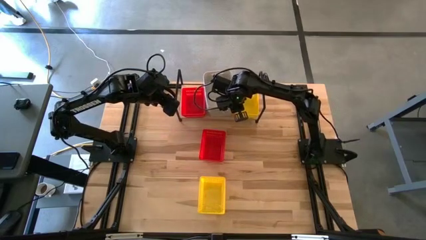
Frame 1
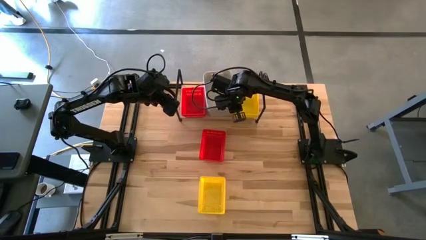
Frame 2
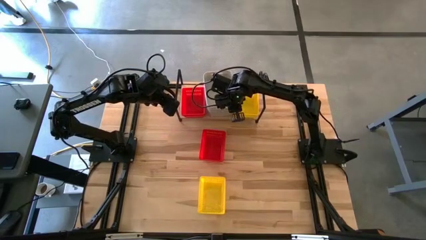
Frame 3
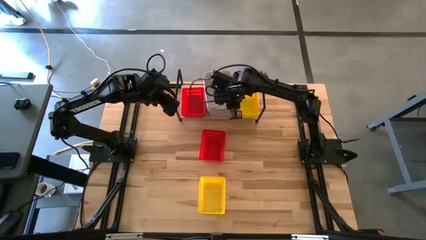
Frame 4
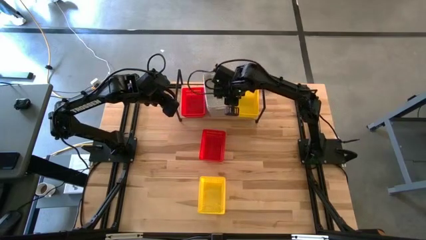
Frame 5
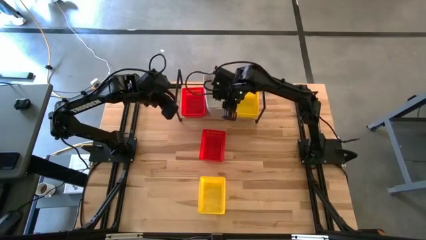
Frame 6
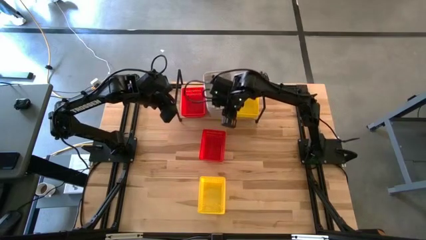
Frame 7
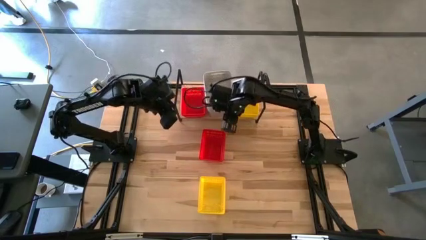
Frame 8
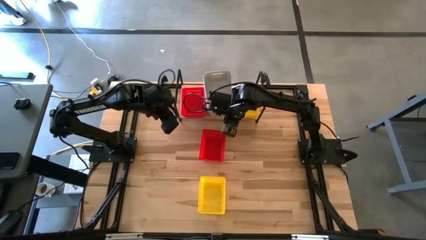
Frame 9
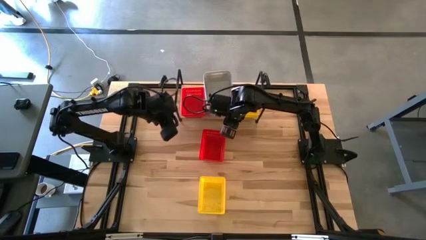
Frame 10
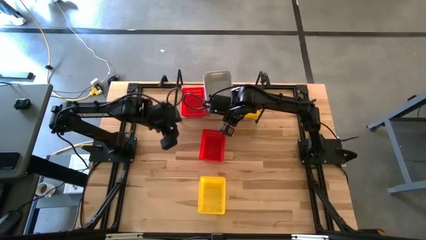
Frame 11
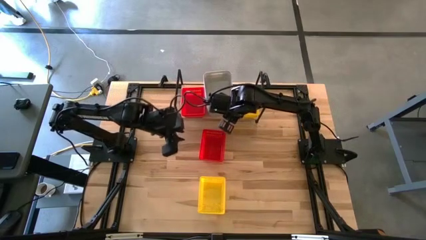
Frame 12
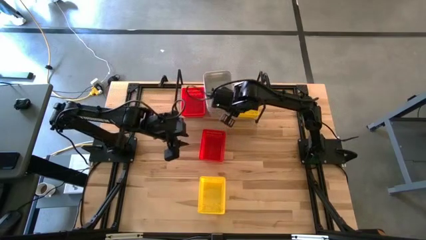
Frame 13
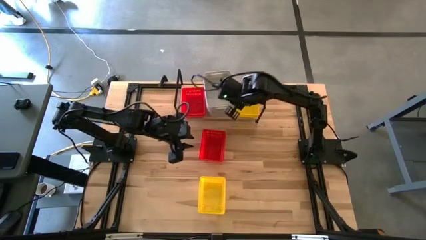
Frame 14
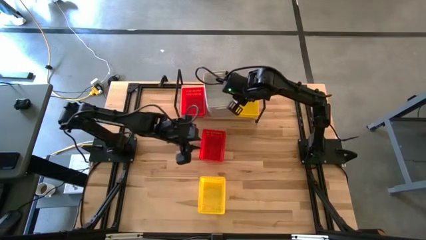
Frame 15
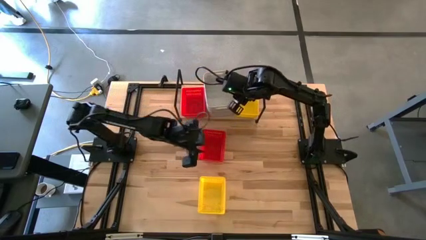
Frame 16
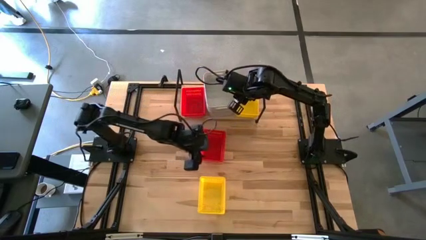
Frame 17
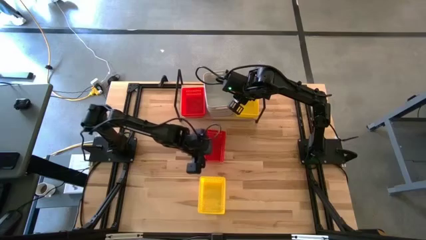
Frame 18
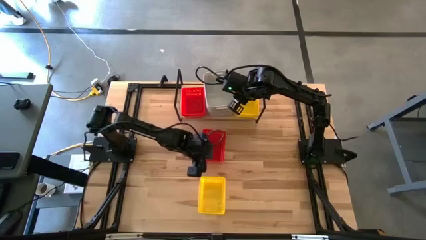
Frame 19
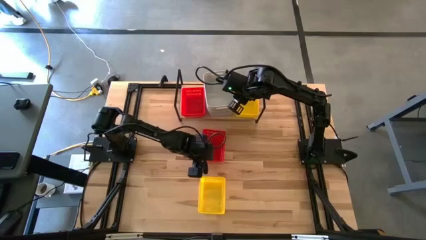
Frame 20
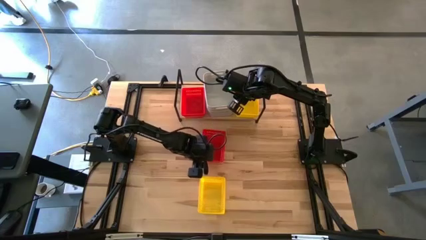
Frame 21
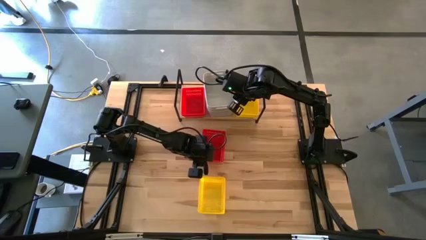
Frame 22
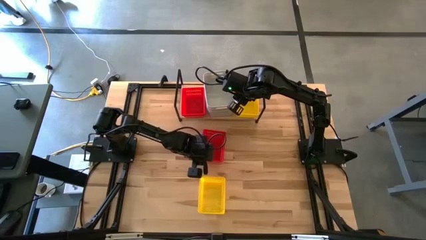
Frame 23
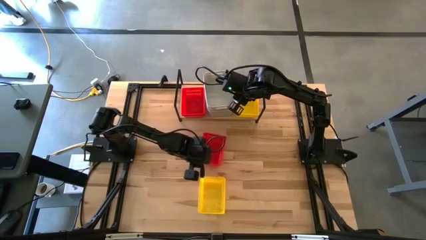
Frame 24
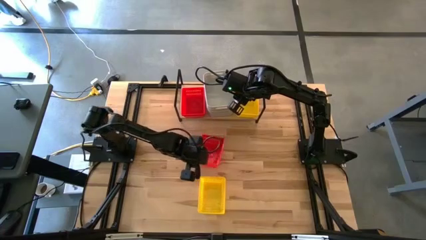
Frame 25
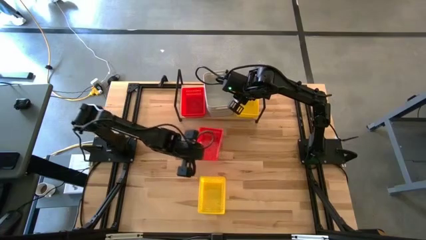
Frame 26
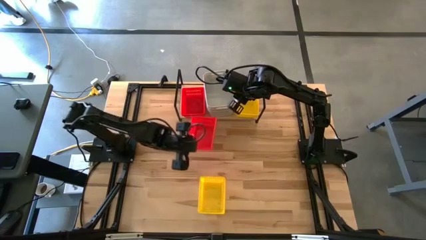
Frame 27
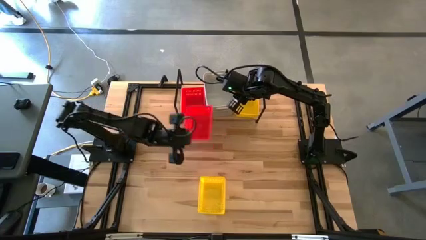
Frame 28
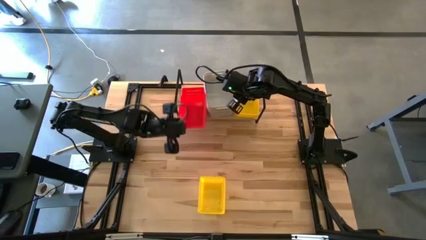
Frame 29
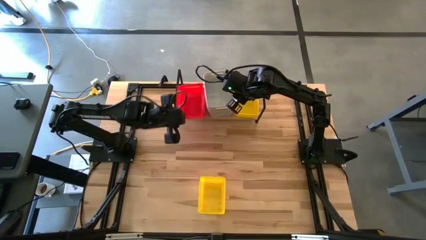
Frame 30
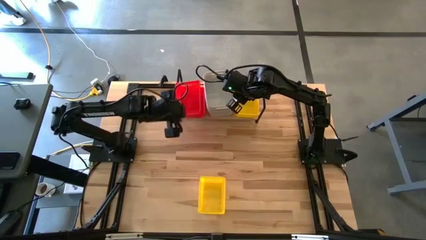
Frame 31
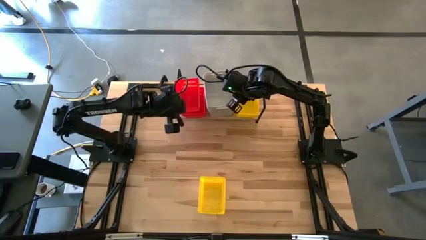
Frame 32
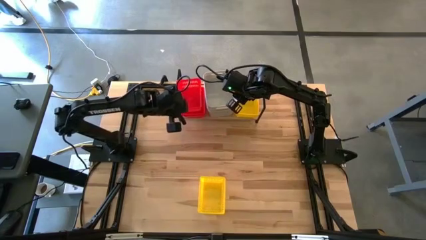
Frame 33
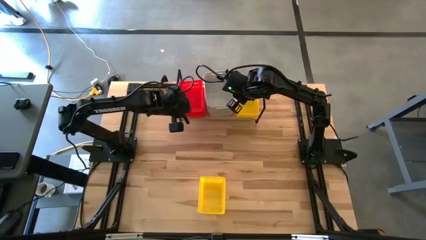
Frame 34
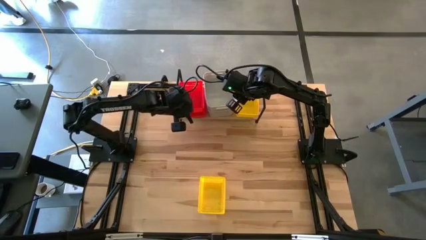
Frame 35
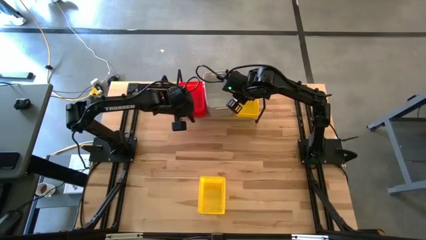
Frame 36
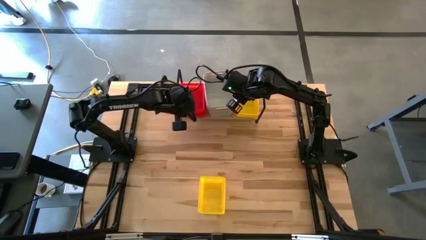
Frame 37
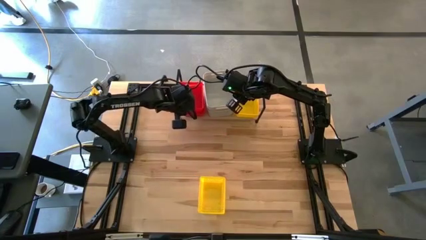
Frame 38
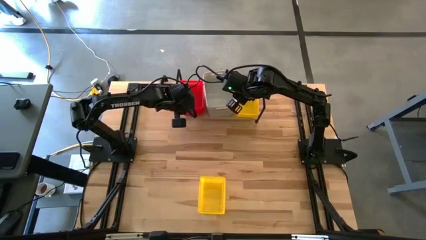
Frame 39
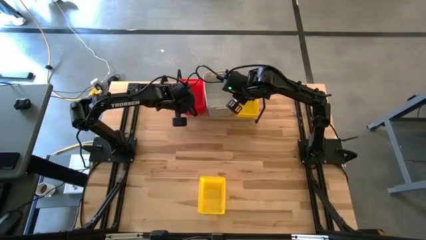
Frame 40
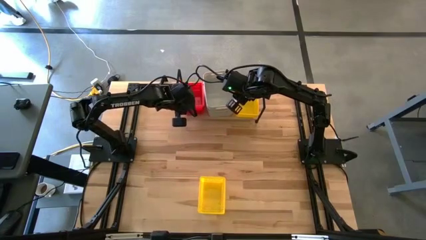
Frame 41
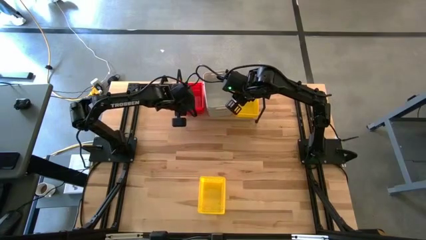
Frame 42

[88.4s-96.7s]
Task: Stack baskets on shelf by color
Stack the red bin on the top of the other red bins on the shelf

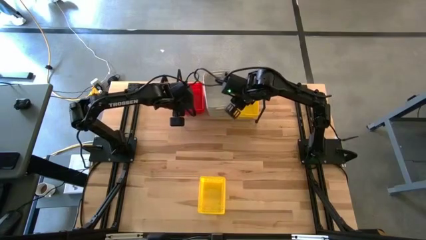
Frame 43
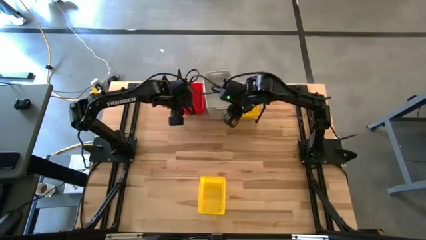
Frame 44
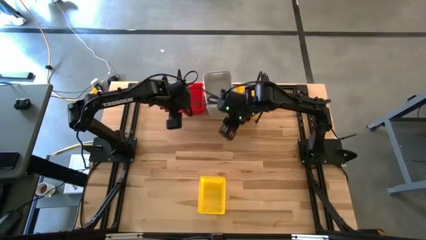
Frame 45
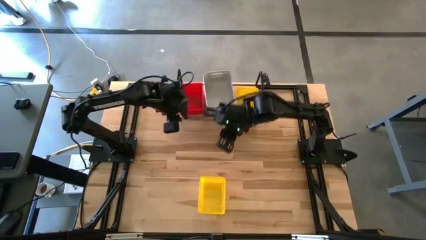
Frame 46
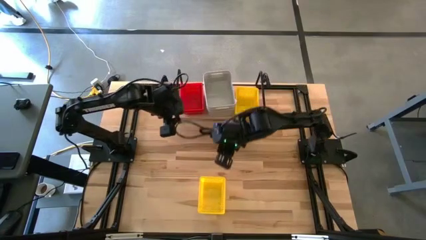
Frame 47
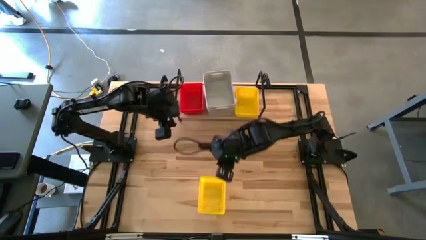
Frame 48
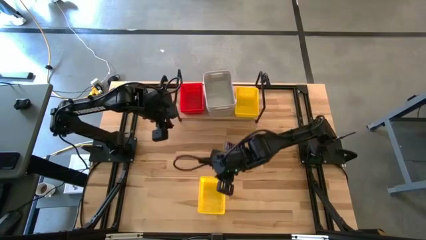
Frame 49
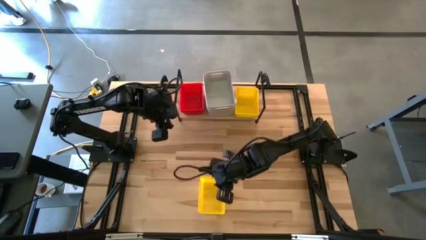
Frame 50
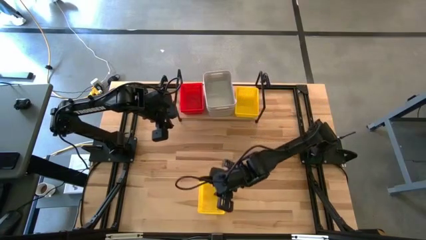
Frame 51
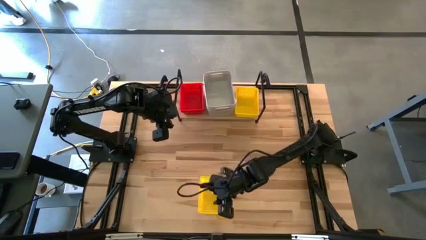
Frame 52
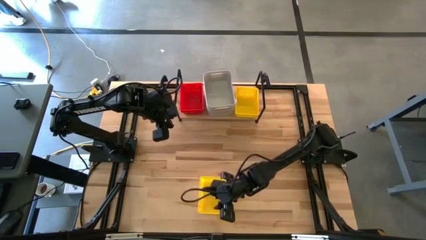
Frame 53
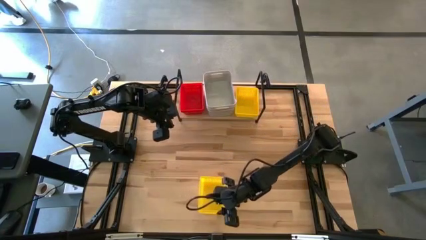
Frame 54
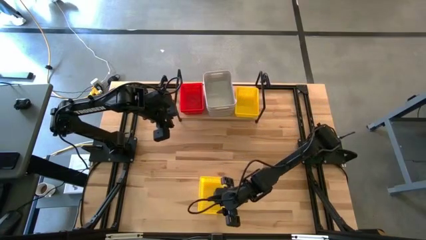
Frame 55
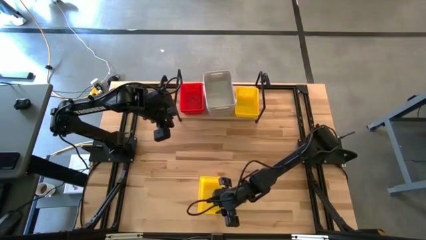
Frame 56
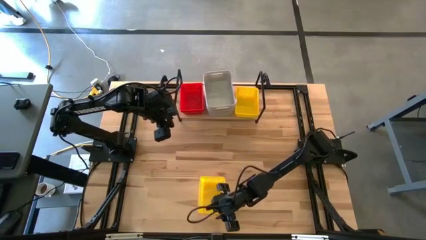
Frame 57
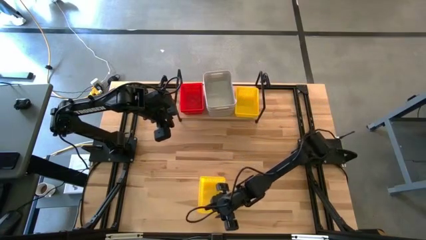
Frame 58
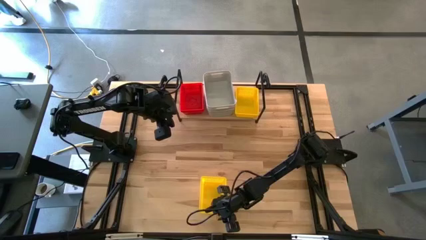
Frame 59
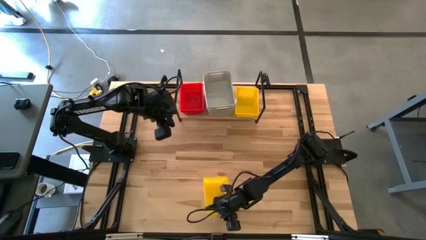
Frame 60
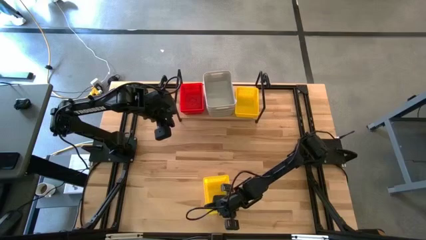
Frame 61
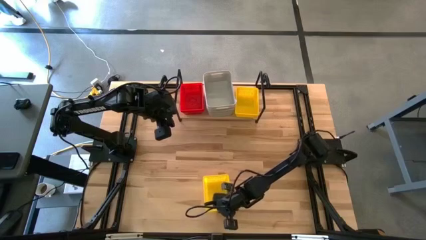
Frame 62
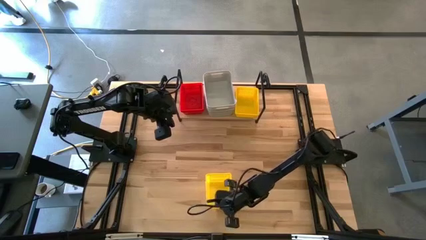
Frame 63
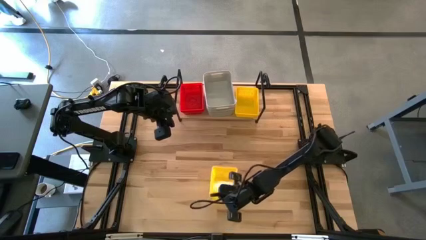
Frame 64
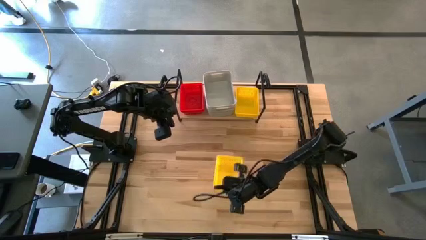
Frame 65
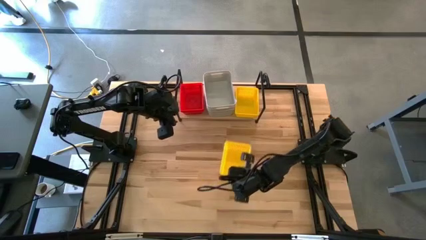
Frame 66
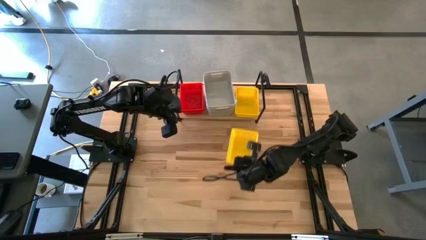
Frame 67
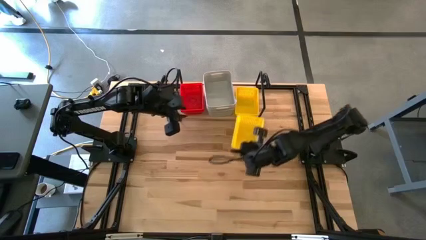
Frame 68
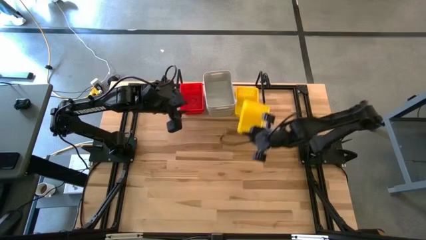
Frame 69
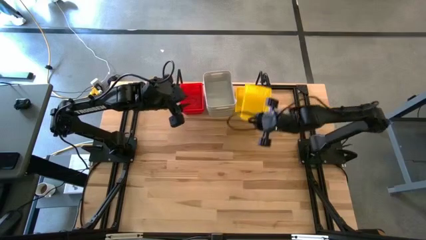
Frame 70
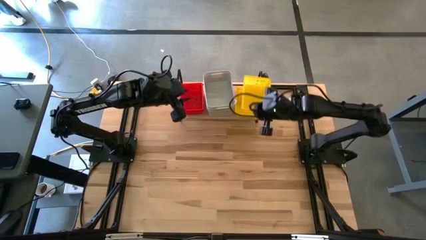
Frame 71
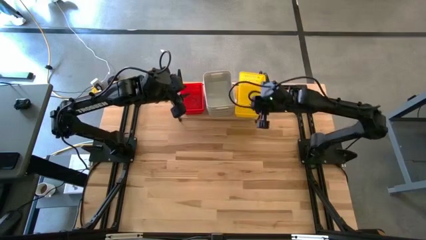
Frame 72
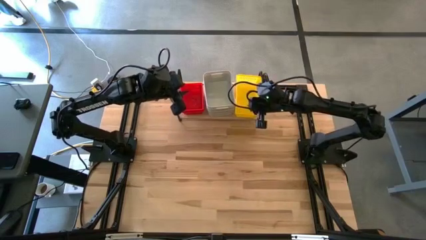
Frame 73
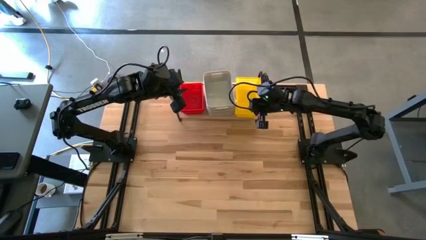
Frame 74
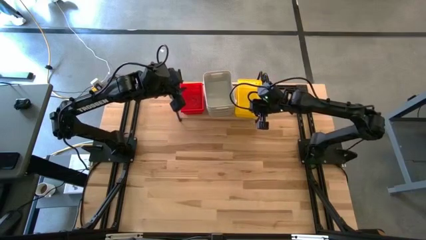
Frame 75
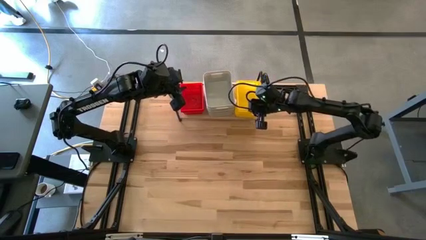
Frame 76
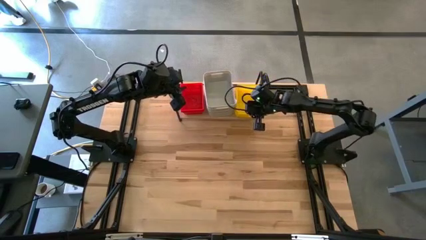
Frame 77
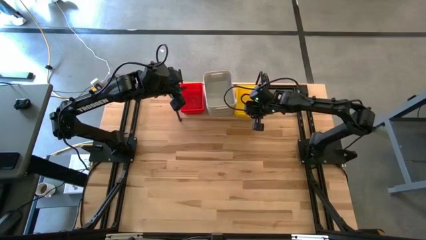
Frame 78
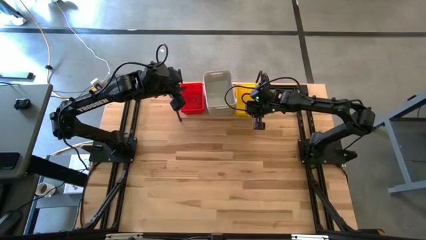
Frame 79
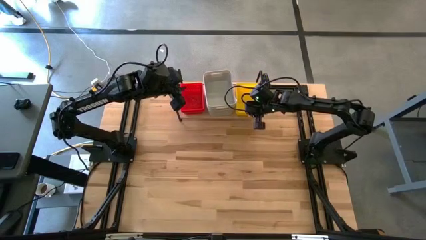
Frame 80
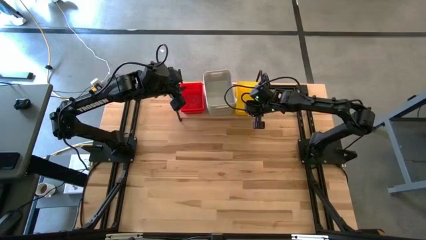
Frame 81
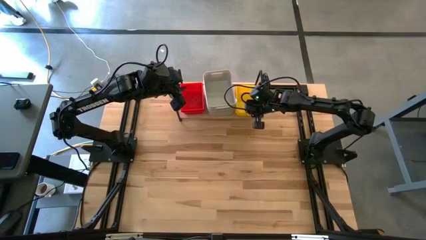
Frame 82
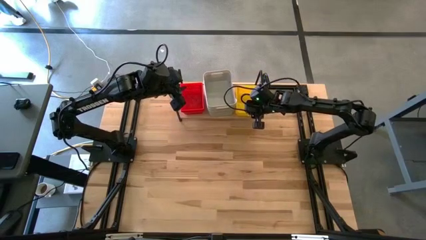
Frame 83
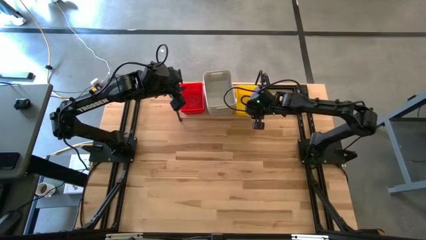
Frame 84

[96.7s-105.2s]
Stack the yellow bin on the top of the other yellow bins on the shelf
